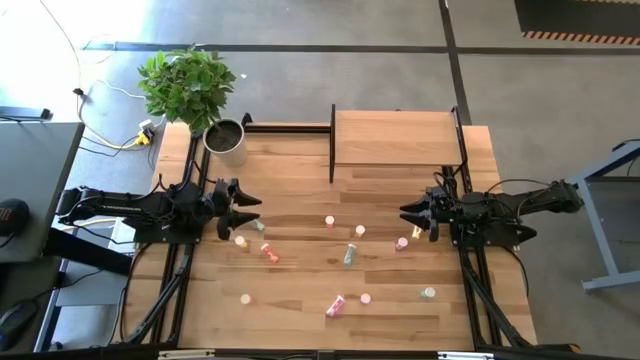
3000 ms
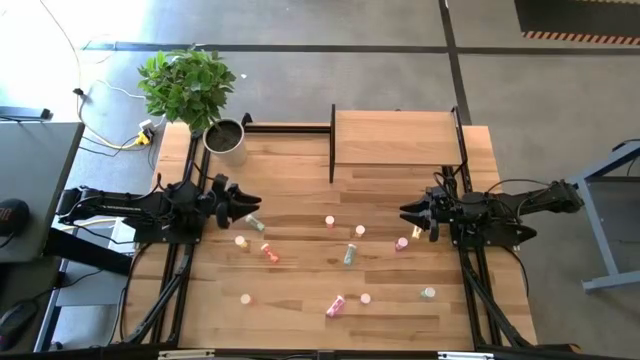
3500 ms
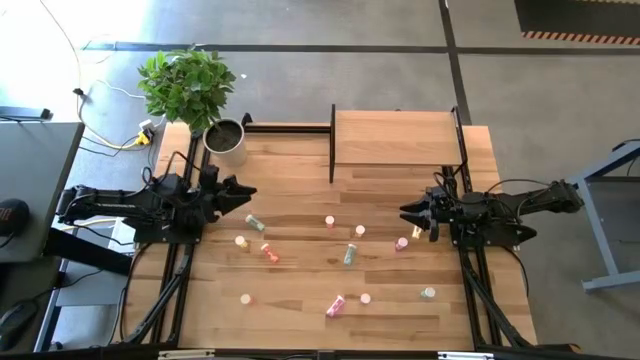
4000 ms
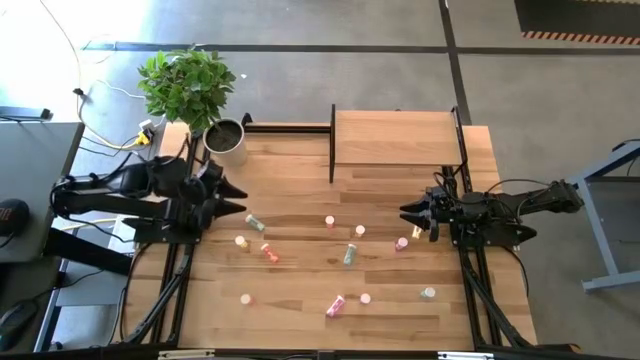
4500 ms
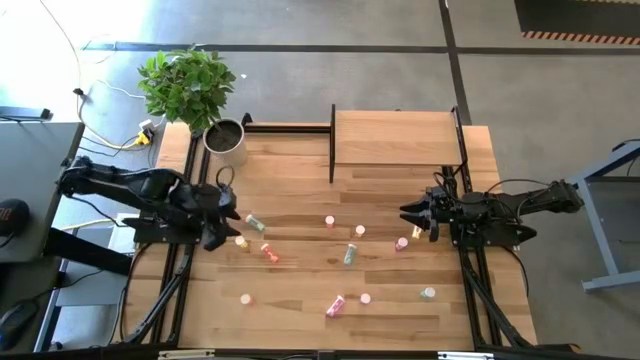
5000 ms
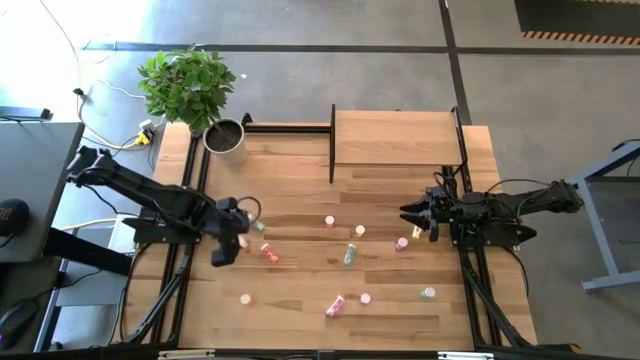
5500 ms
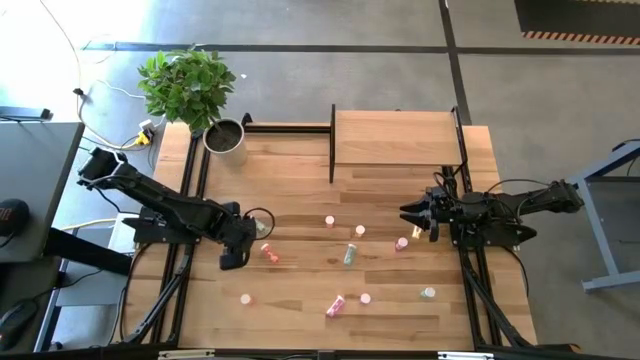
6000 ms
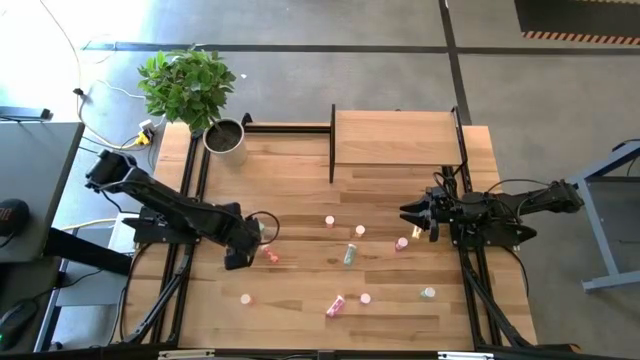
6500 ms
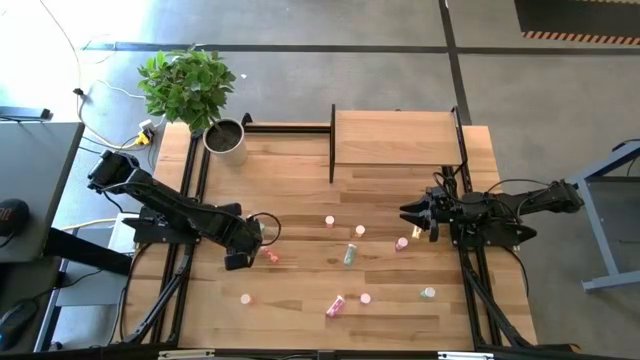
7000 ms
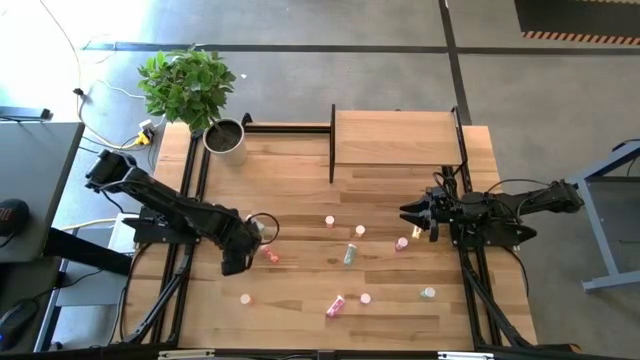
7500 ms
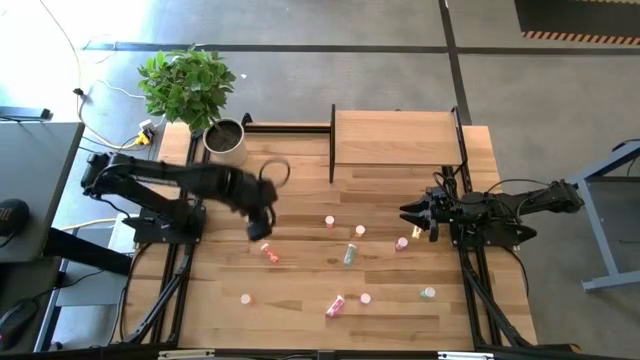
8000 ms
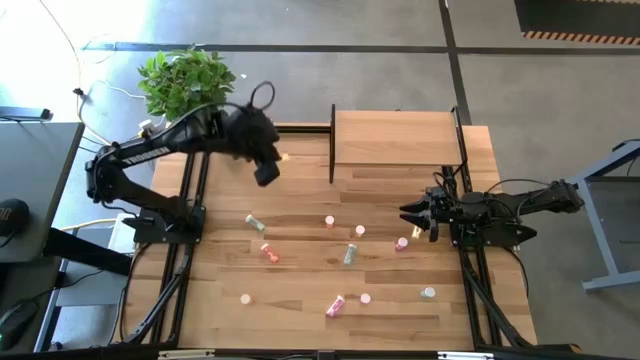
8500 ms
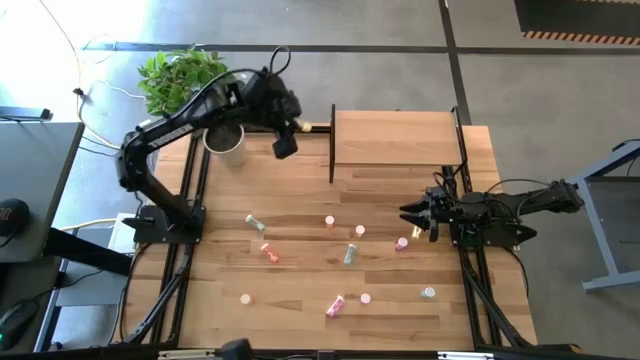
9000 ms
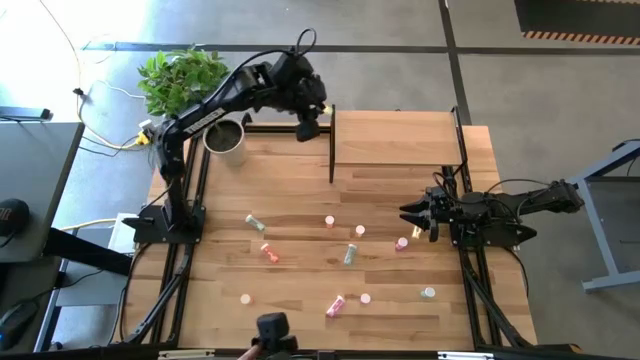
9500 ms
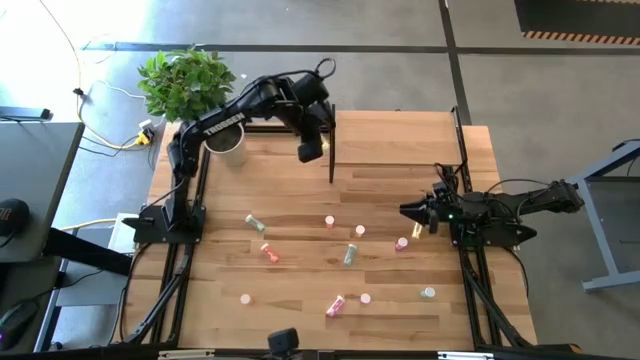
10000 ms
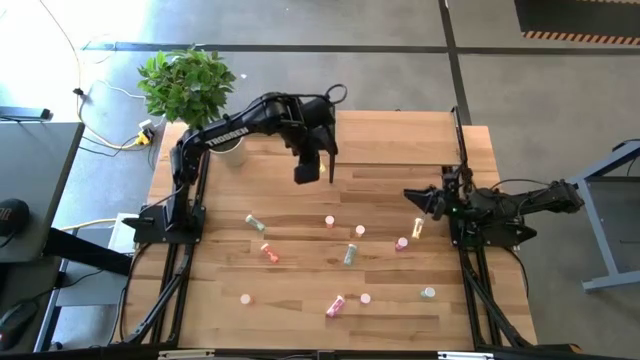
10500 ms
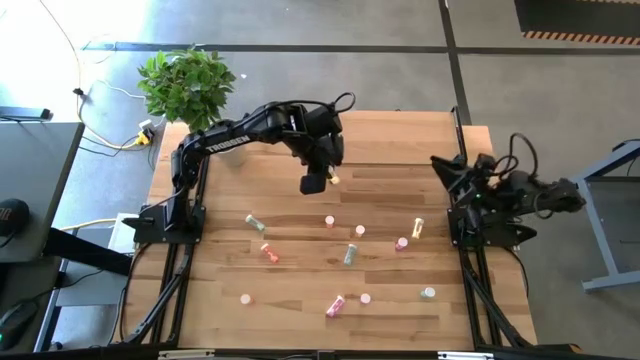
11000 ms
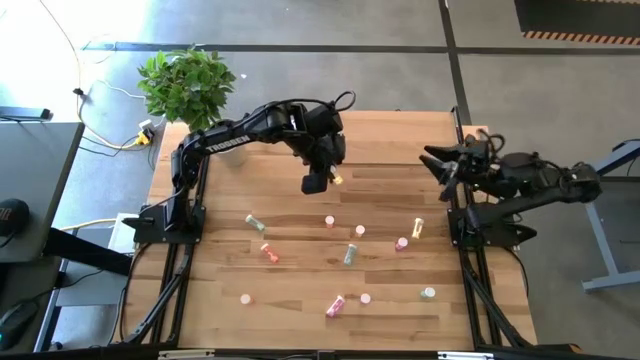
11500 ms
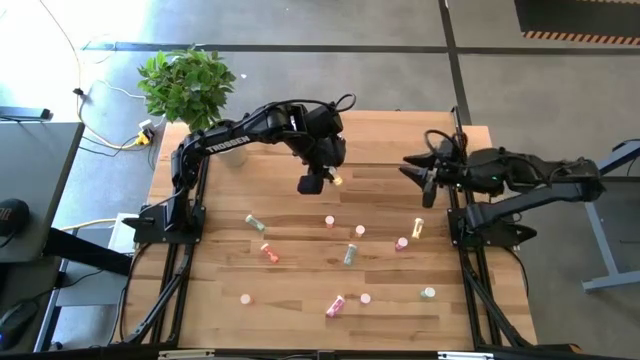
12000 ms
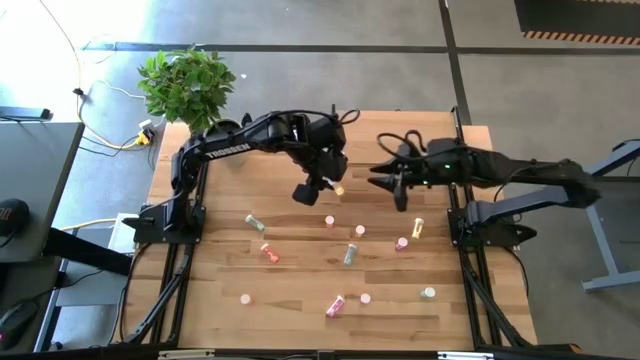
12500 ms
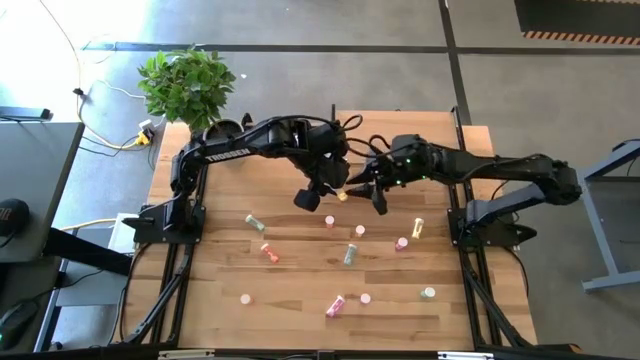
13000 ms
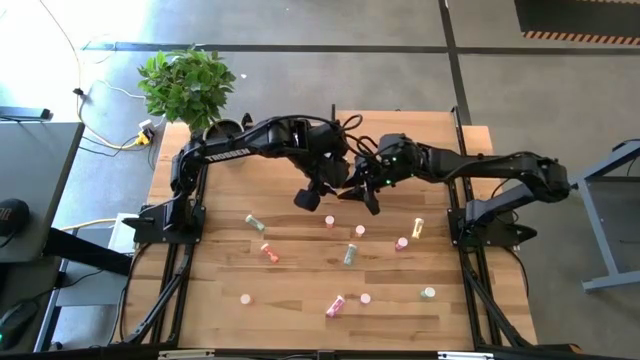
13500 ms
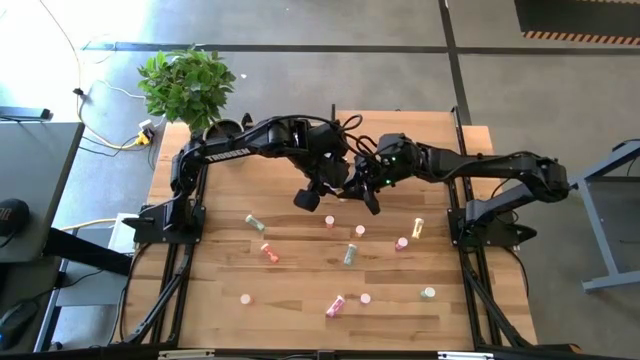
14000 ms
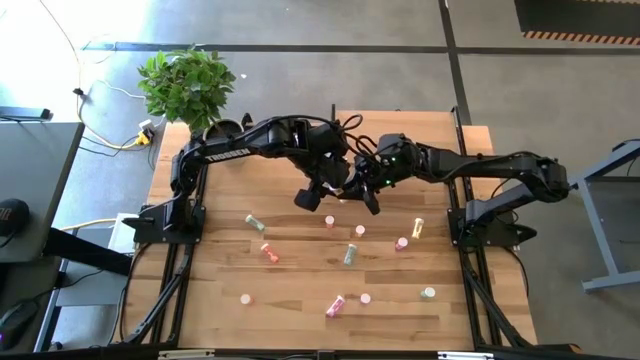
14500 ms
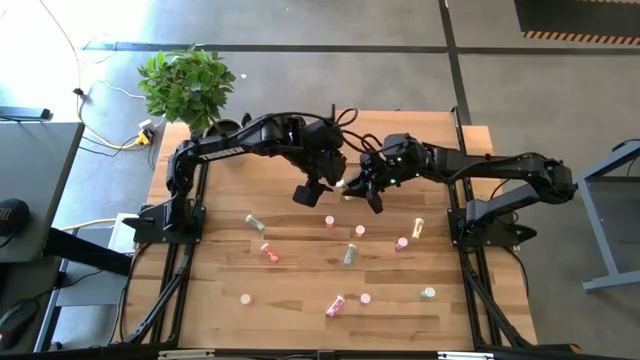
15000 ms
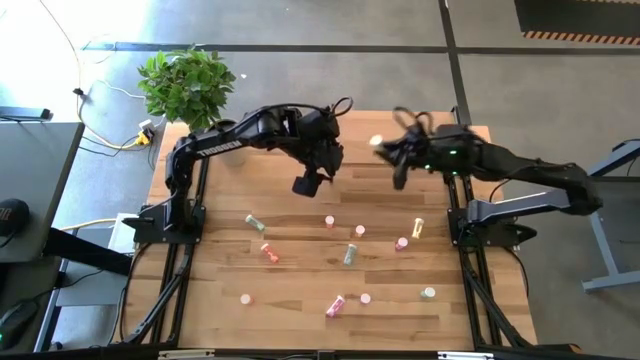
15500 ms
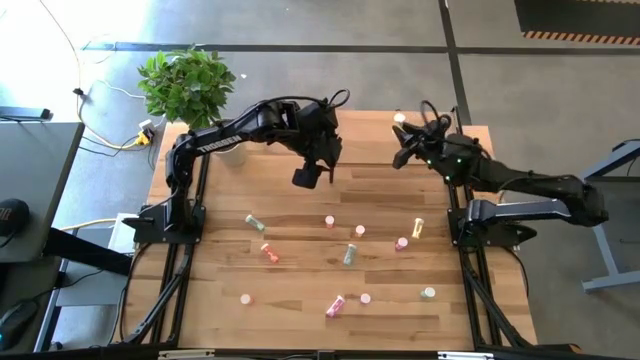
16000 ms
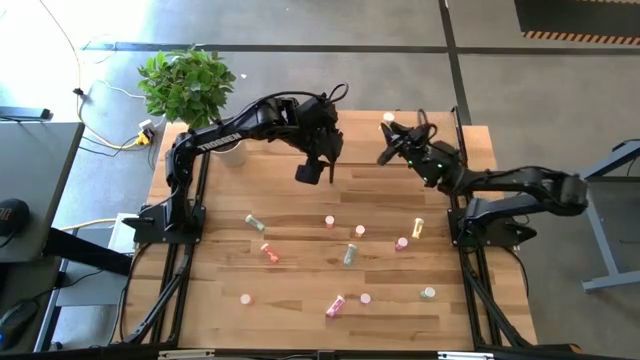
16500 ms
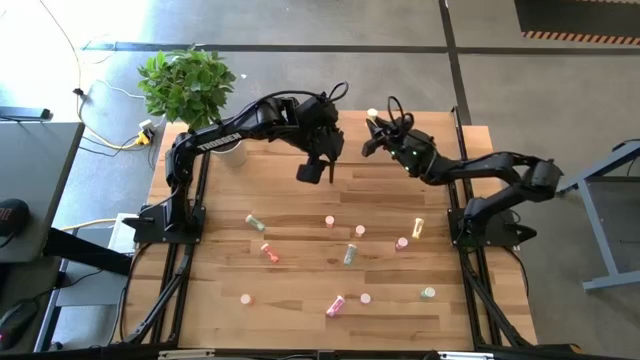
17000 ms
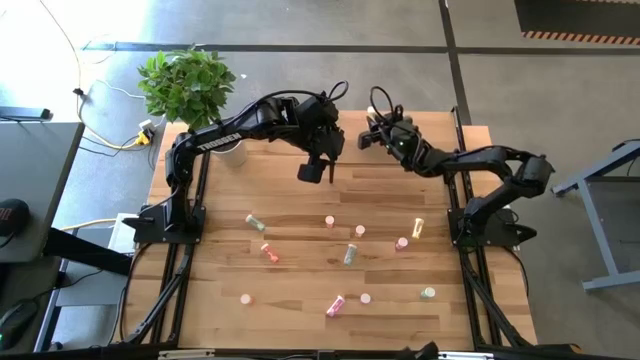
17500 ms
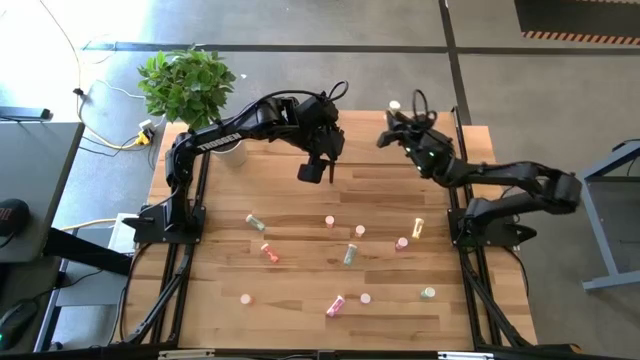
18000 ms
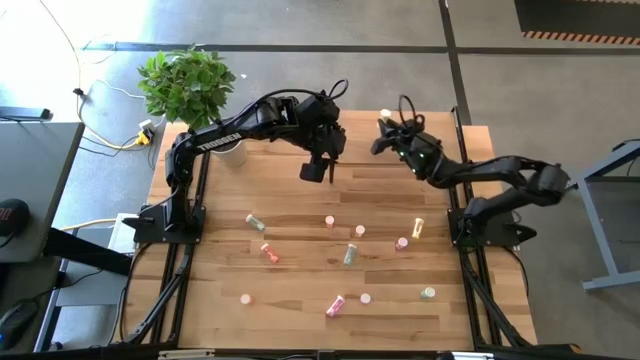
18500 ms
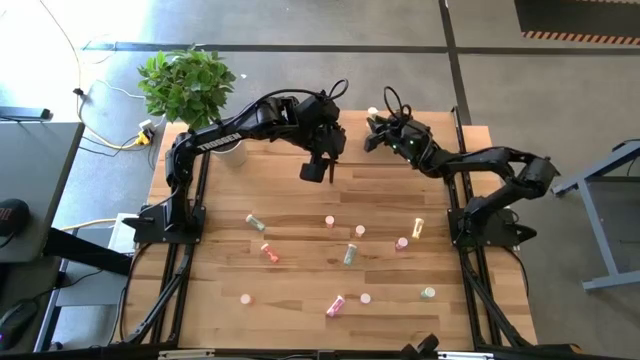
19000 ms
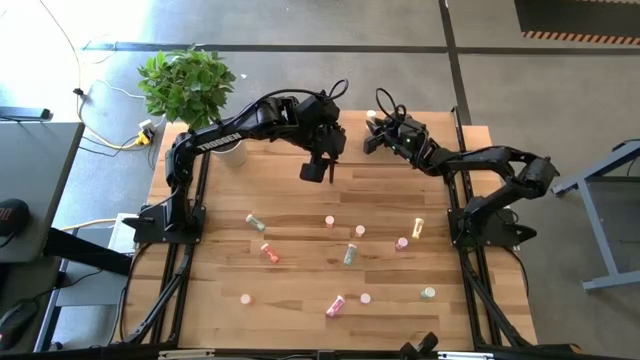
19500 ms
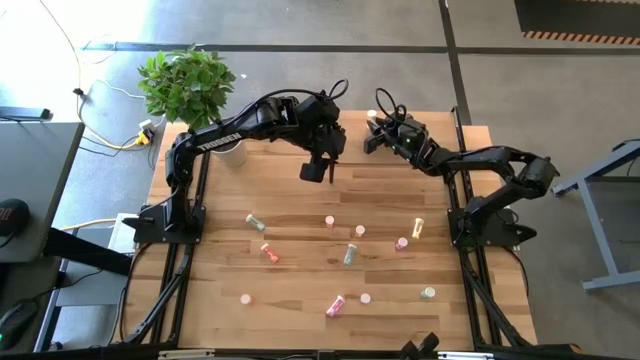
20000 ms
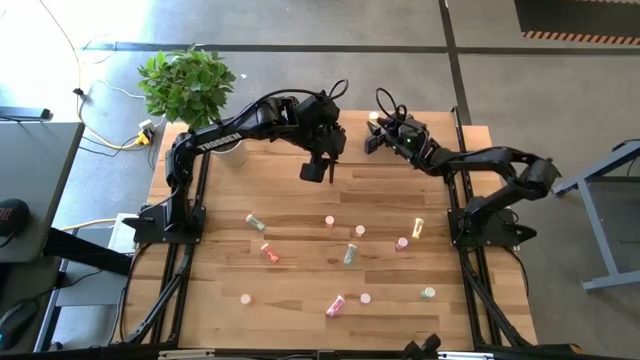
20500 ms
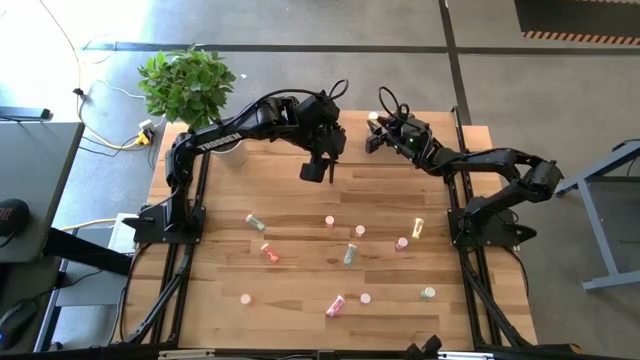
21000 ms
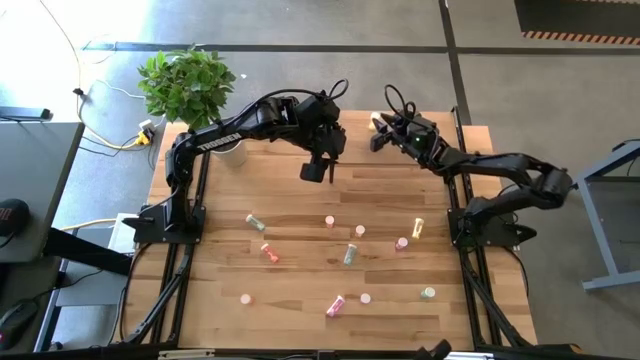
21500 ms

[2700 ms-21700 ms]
Task: Pick and place medicine bottles onto shelf by color
Put the left yellow medicine bottle on the shelf

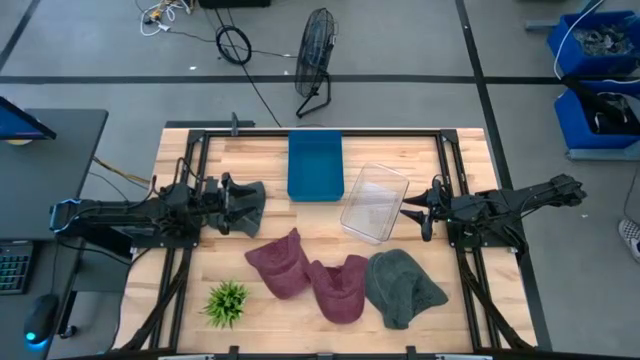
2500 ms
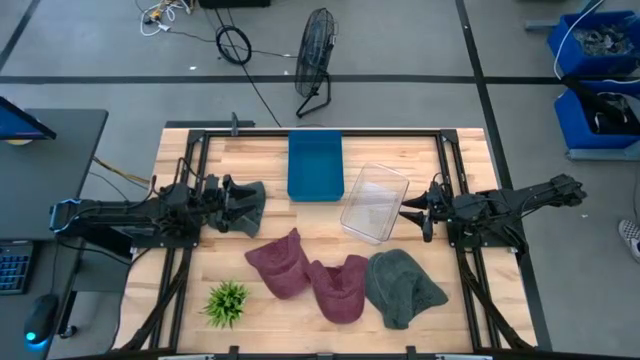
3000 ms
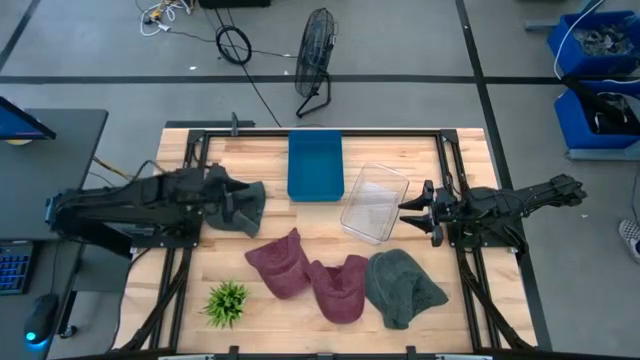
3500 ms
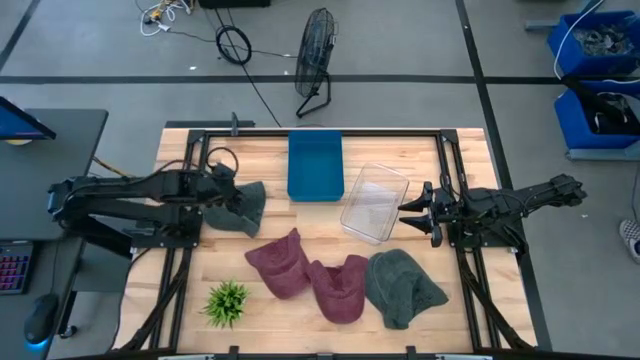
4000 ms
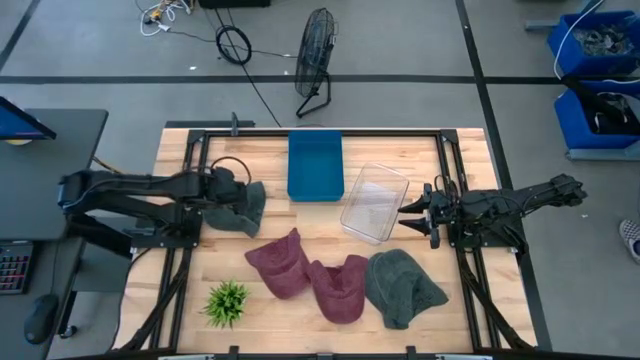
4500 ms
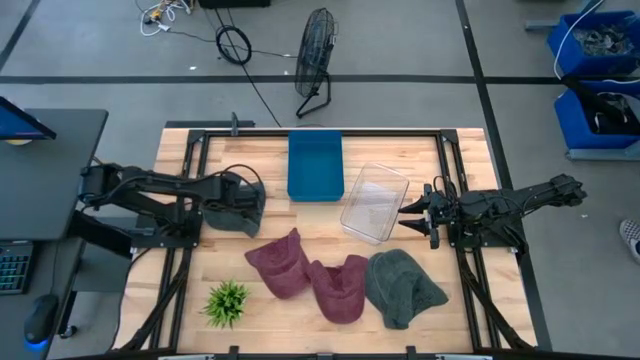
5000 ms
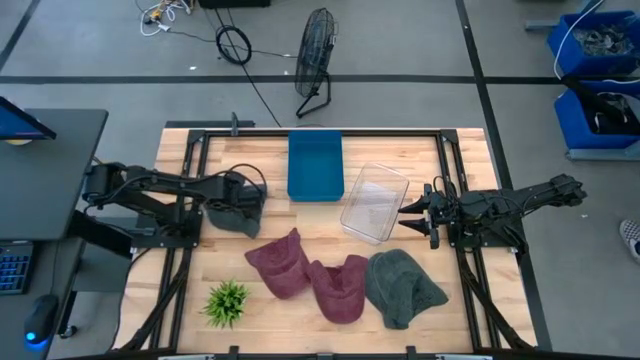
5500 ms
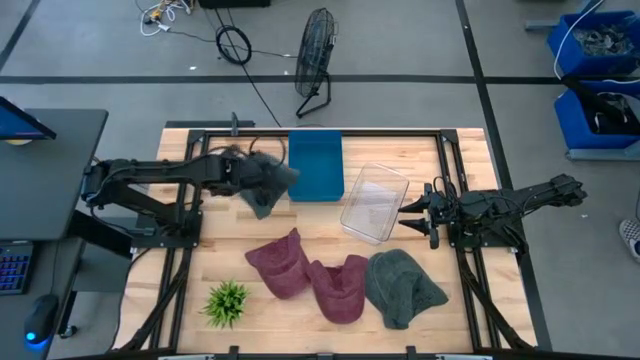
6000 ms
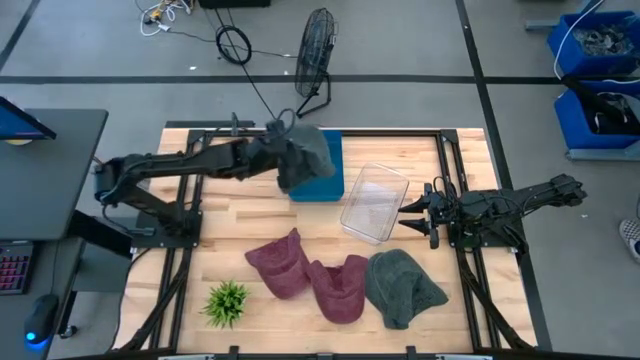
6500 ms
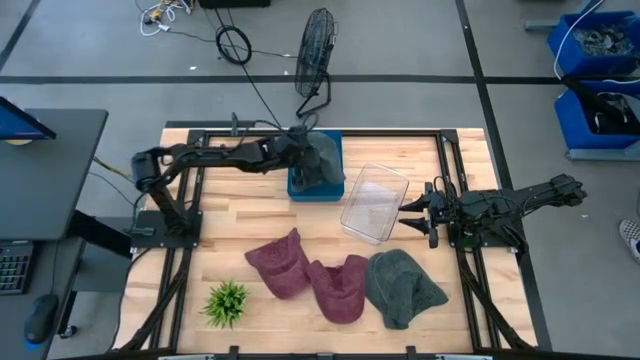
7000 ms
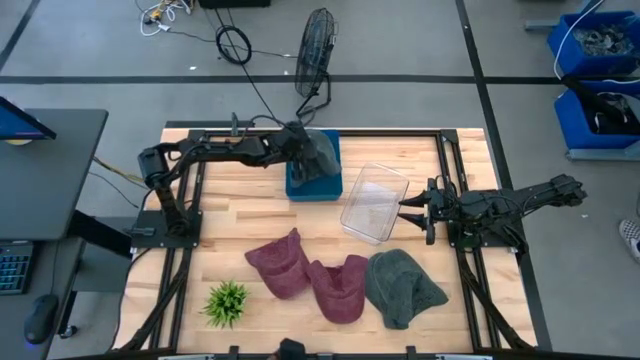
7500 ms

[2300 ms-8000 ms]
Task: Pick & Place hat
Put the gray cap into the blue bin
